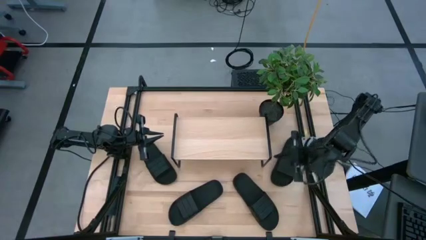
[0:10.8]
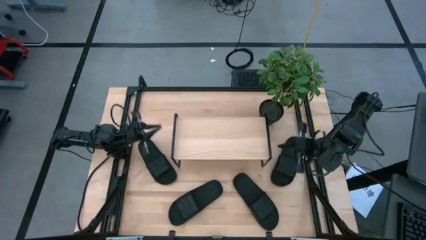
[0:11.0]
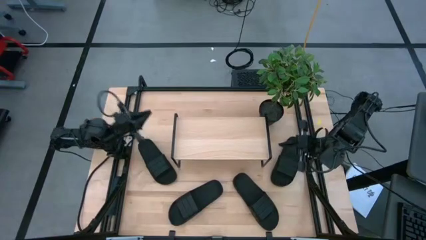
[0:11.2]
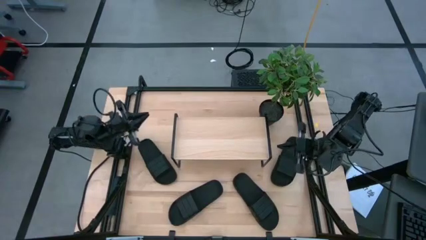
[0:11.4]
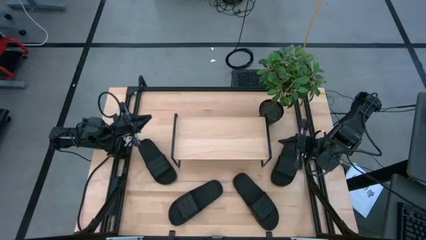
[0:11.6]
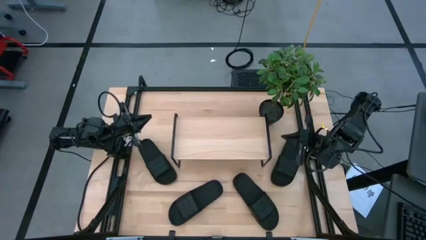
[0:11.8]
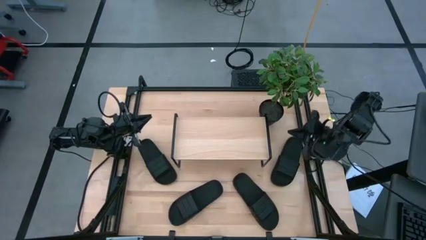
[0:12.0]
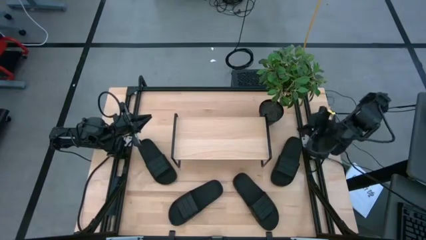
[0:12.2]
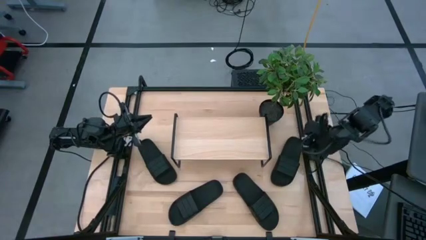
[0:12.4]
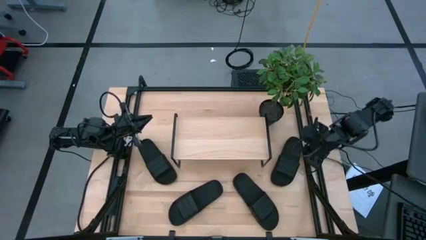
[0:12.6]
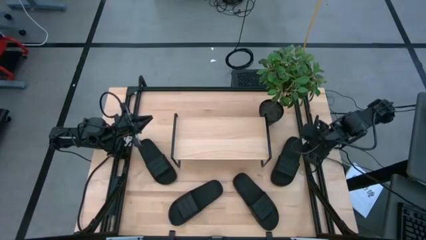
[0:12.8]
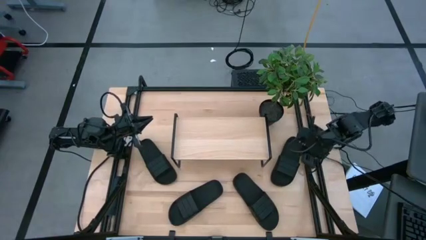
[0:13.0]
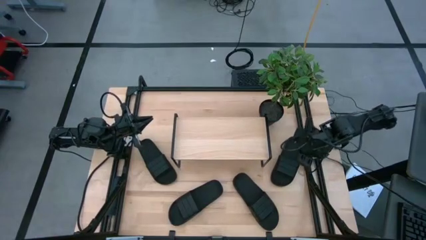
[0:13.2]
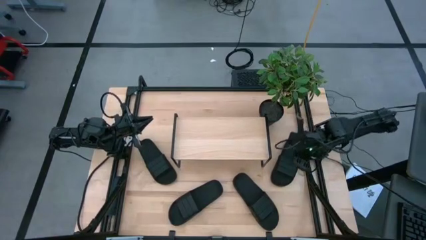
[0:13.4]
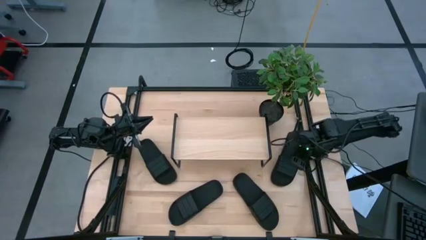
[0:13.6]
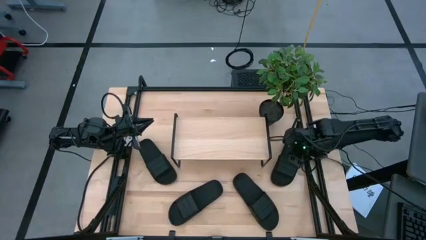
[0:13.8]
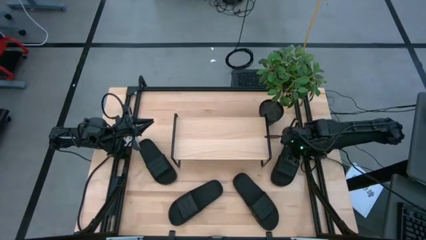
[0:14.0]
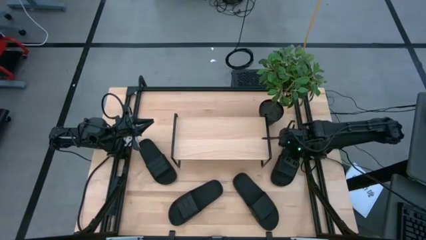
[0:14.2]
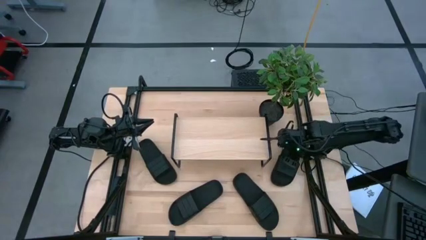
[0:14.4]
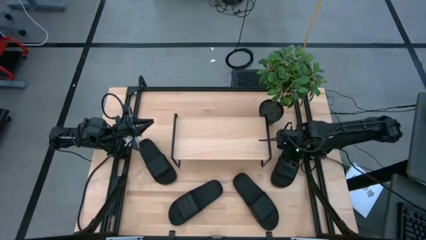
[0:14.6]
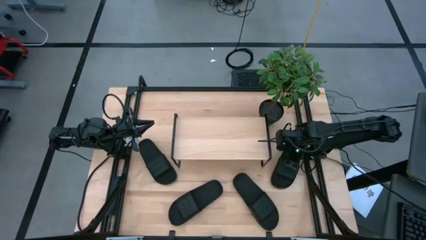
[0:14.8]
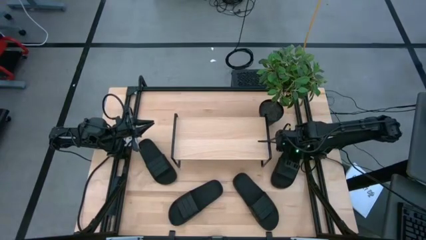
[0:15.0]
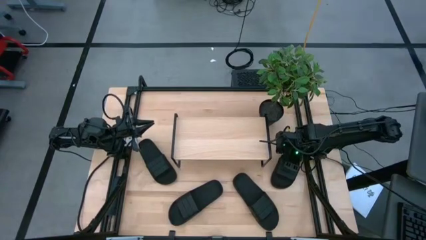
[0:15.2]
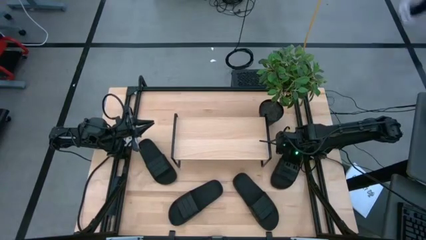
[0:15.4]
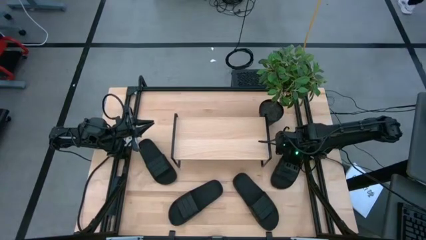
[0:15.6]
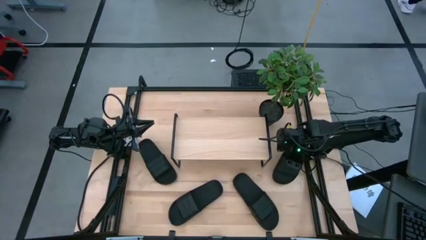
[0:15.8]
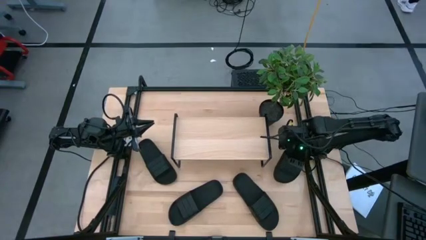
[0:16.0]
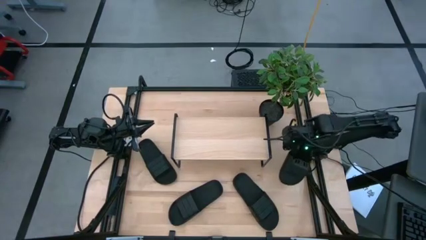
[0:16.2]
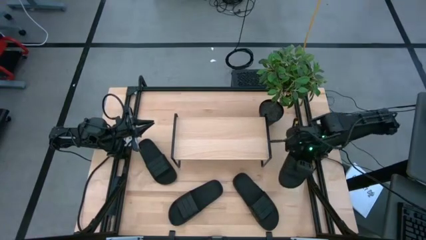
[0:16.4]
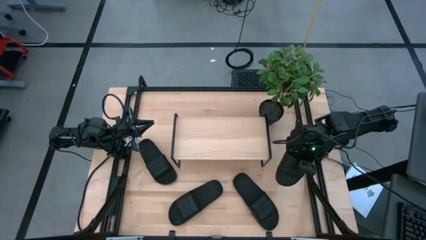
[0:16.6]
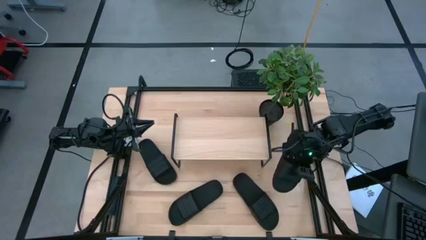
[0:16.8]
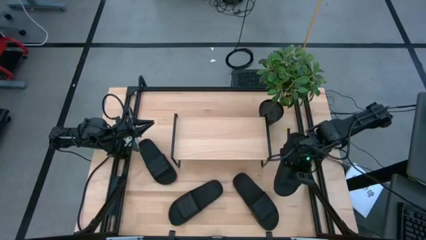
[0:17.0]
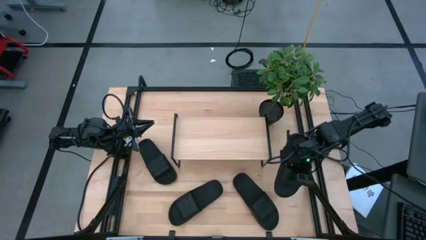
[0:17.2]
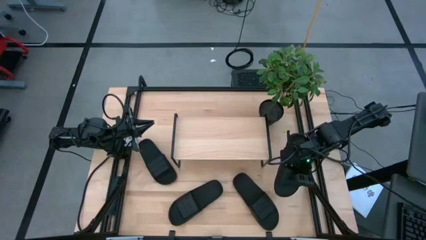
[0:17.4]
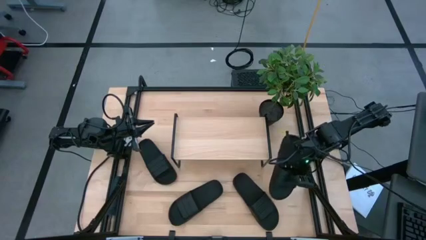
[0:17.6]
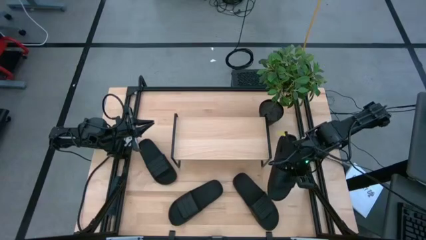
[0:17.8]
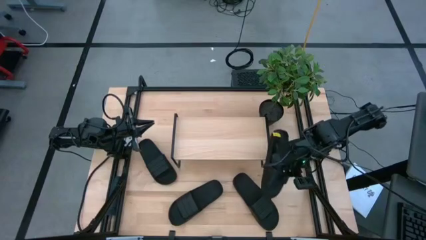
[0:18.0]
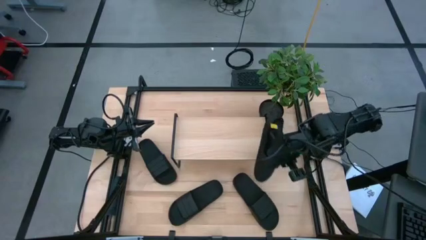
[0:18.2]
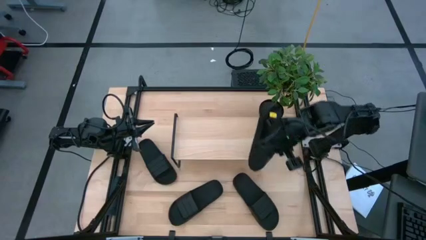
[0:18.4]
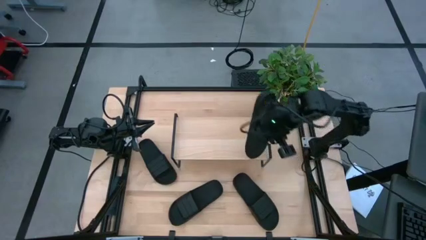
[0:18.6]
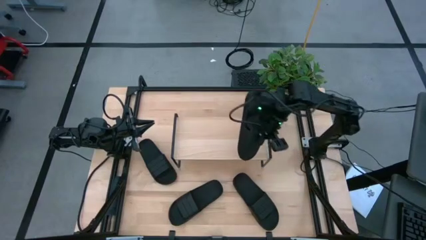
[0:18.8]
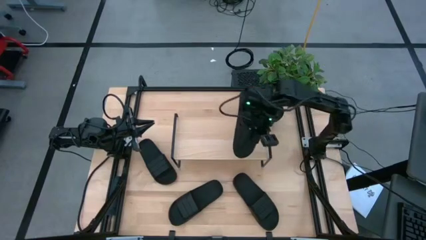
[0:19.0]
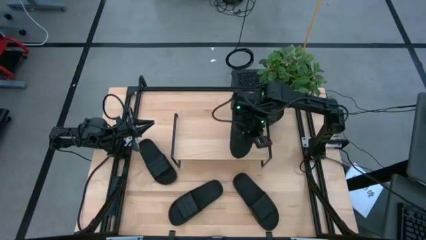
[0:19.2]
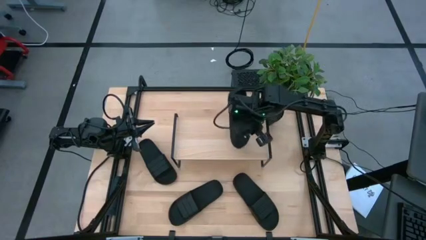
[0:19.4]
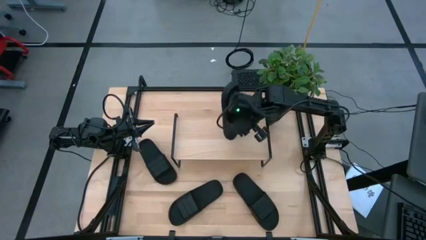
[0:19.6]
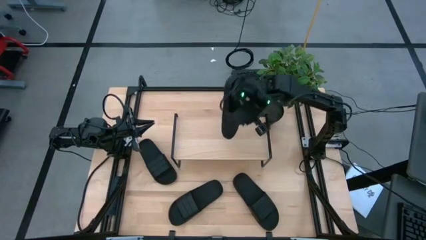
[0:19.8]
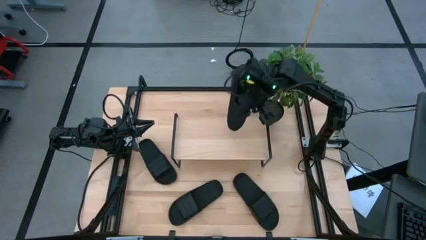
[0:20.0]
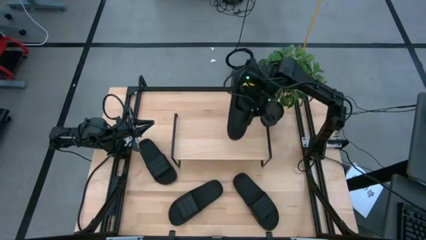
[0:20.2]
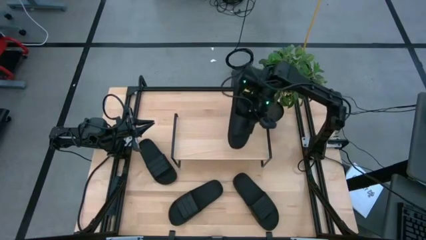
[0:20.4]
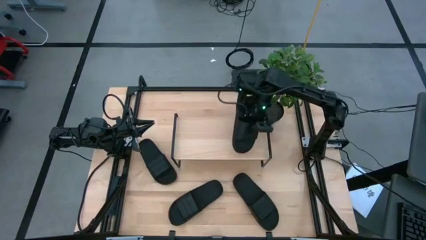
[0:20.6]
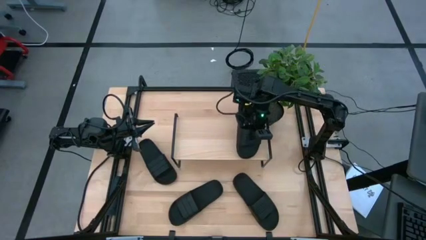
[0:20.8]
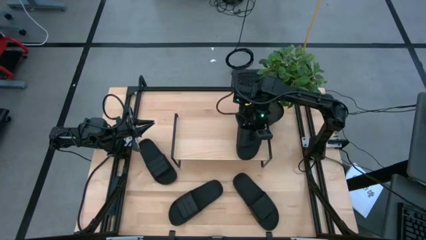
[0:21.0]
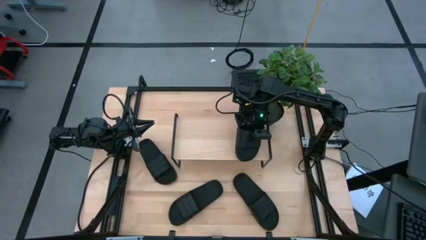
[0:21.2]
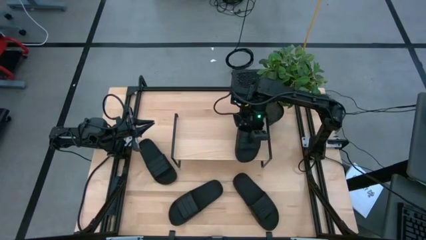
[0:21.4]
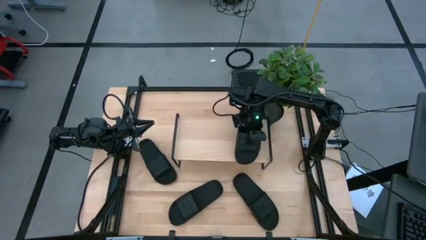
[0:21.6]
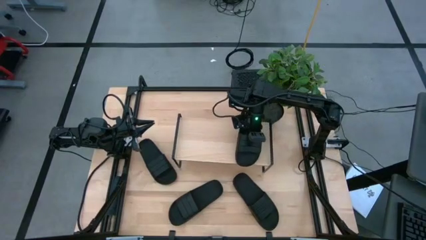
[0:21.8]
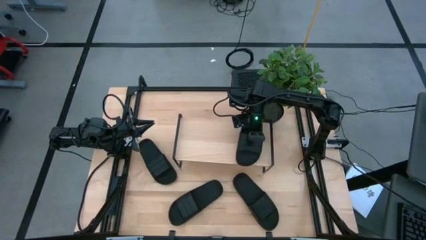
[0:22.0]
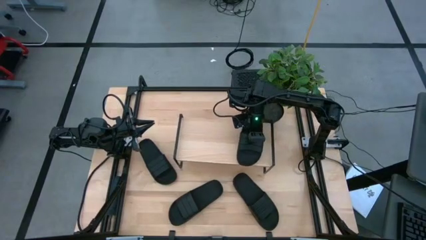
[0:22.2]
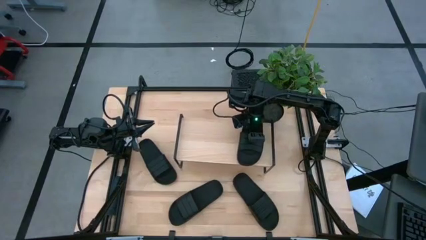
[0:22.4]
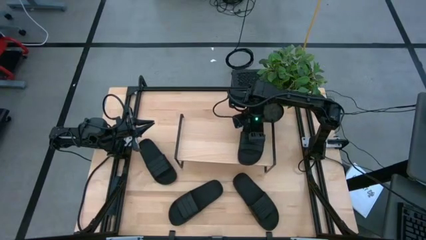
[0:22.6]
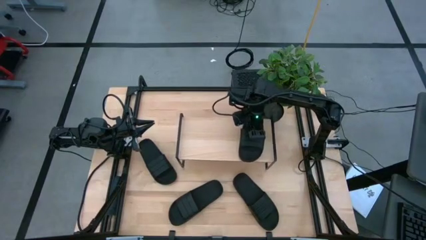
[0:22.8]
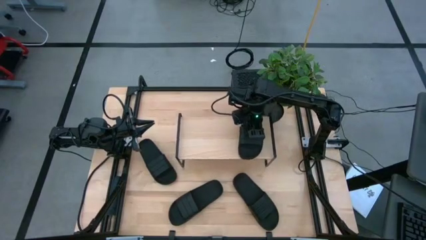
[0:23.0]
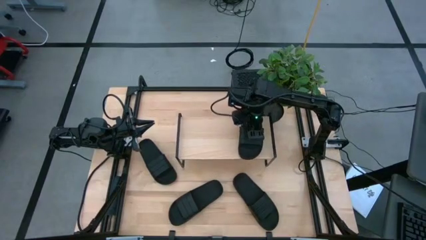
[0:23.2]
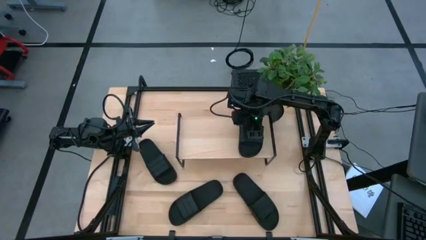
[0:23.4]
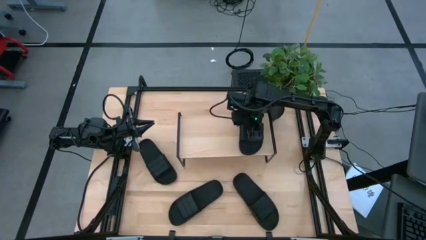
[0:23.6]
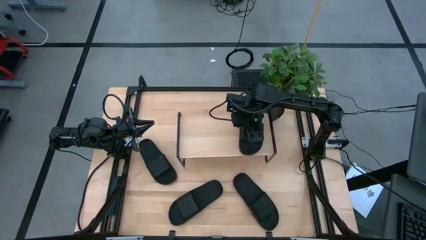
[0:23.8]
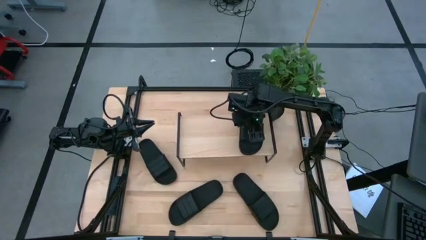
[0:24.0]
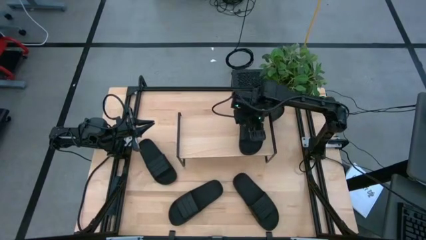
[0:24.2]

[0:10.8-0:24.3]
Task: Pick and place slides into the shelf
Put the black slides on the shelf
